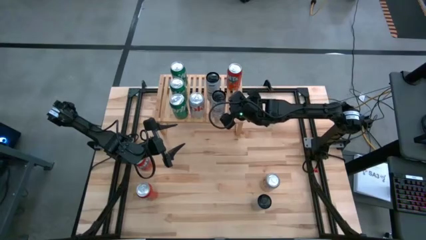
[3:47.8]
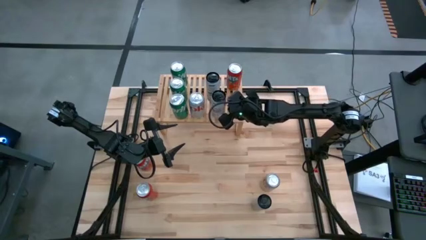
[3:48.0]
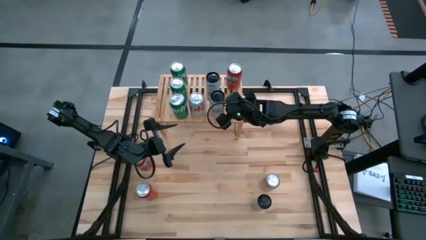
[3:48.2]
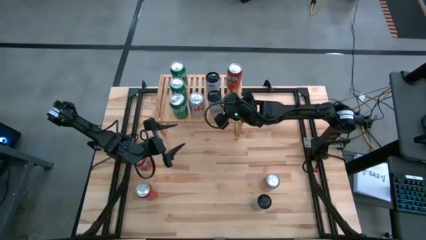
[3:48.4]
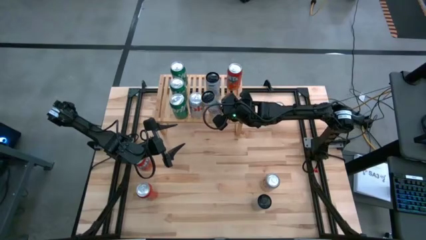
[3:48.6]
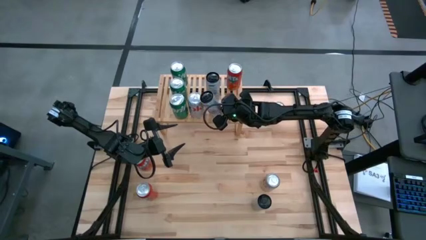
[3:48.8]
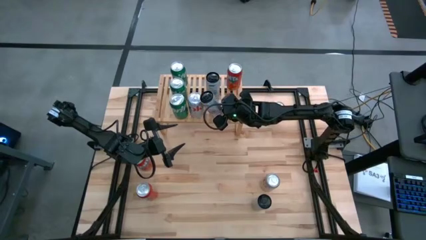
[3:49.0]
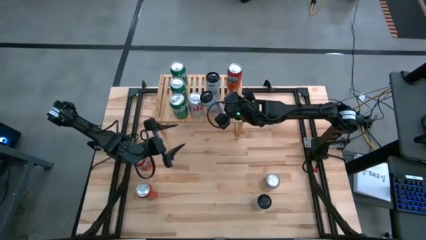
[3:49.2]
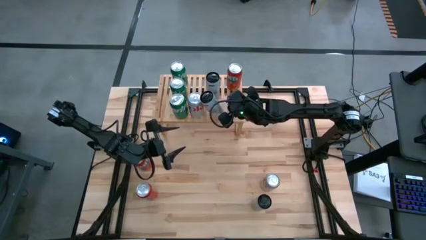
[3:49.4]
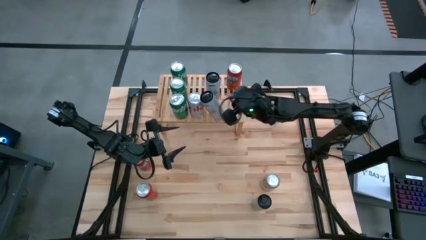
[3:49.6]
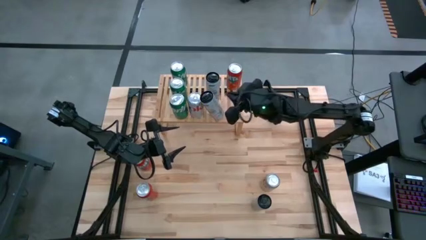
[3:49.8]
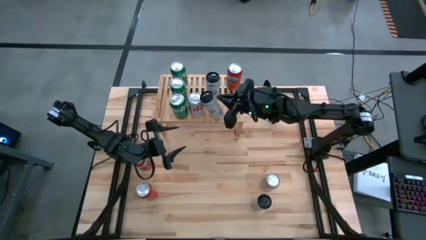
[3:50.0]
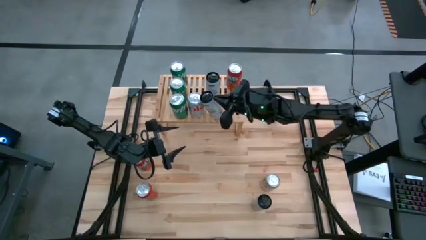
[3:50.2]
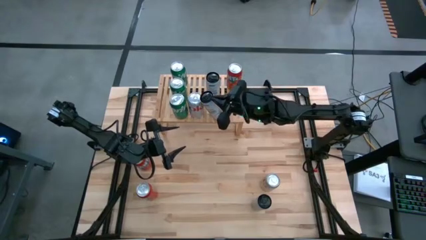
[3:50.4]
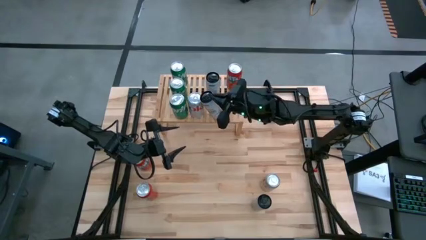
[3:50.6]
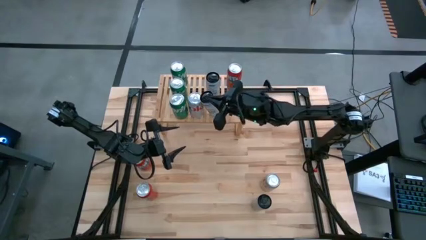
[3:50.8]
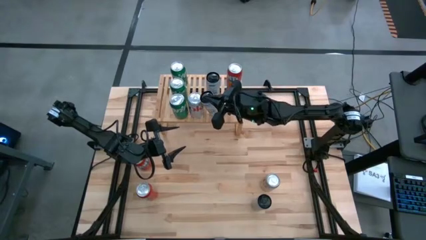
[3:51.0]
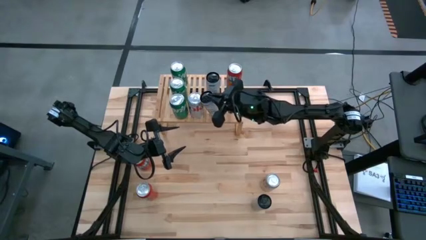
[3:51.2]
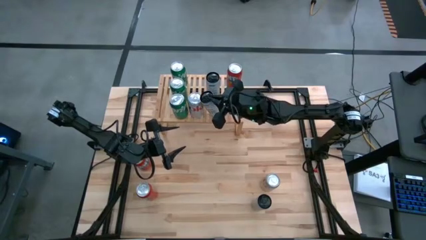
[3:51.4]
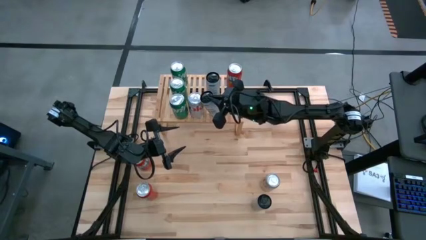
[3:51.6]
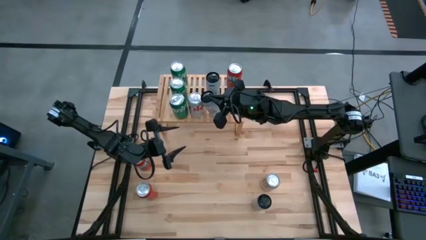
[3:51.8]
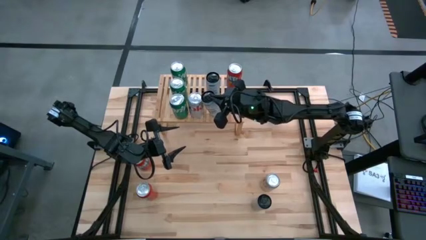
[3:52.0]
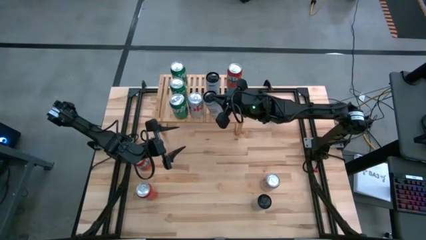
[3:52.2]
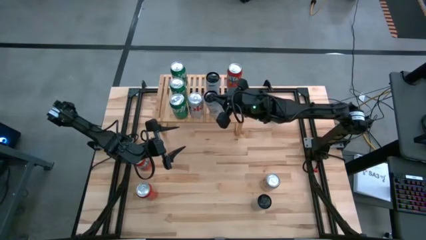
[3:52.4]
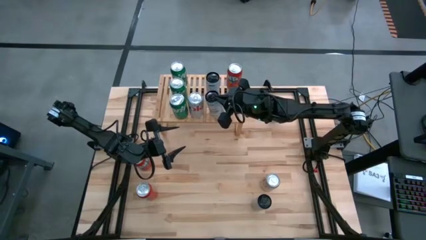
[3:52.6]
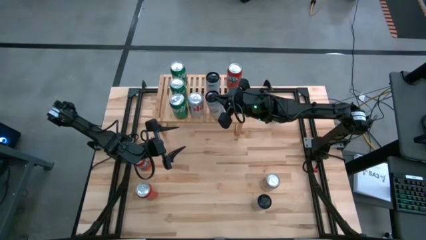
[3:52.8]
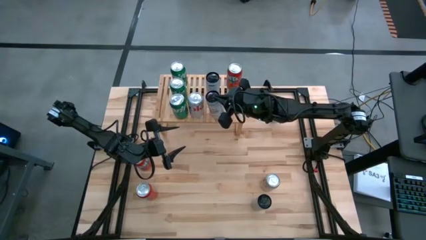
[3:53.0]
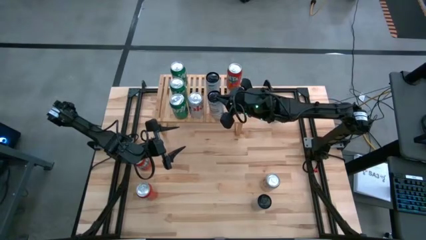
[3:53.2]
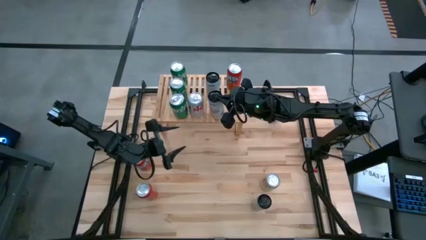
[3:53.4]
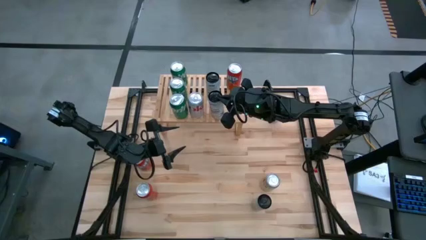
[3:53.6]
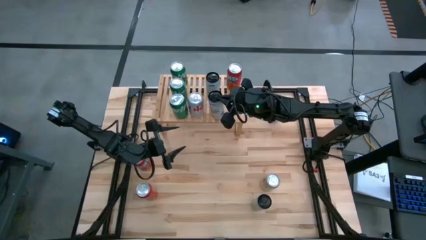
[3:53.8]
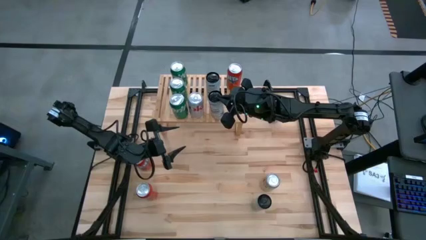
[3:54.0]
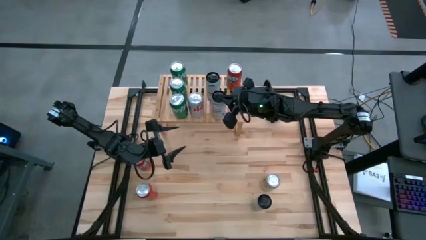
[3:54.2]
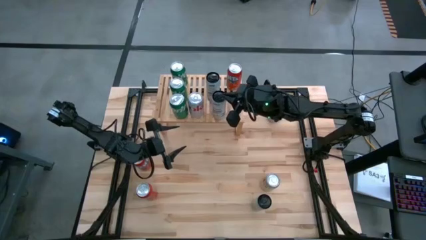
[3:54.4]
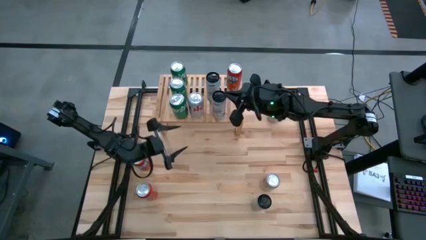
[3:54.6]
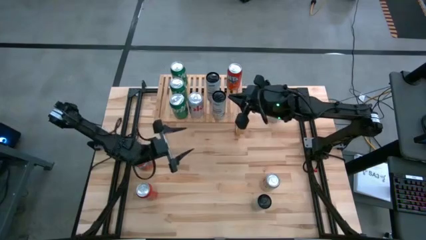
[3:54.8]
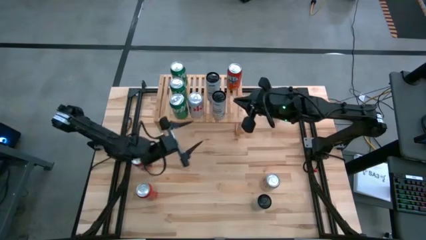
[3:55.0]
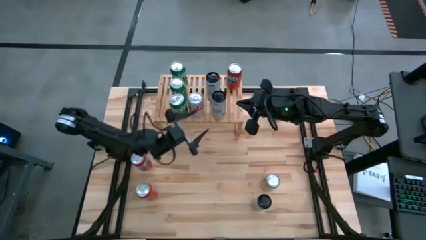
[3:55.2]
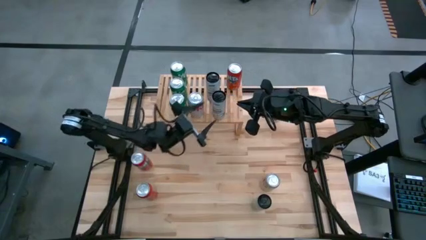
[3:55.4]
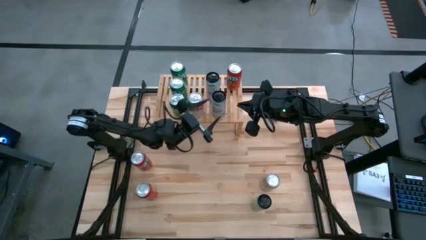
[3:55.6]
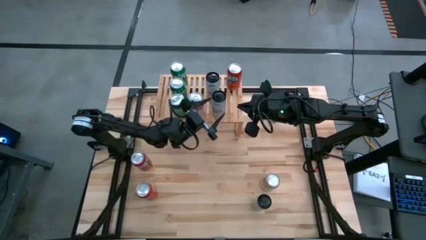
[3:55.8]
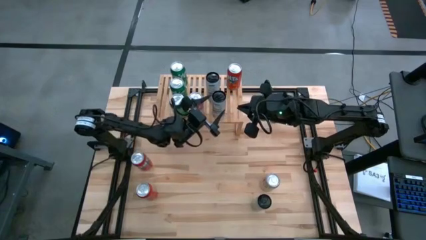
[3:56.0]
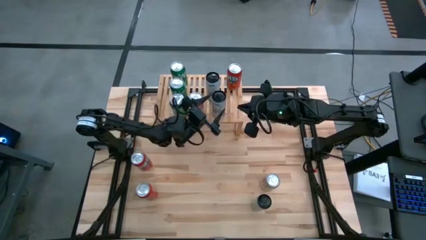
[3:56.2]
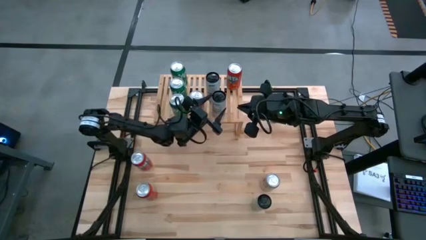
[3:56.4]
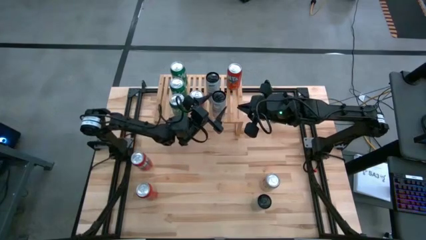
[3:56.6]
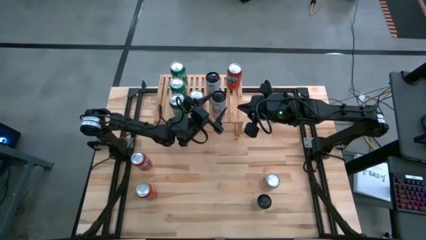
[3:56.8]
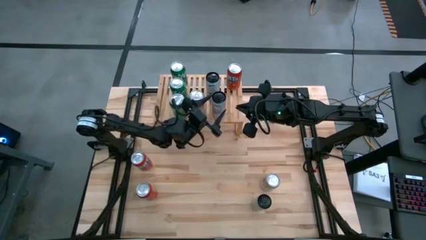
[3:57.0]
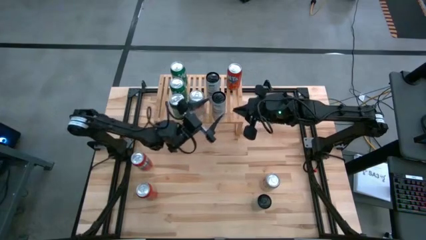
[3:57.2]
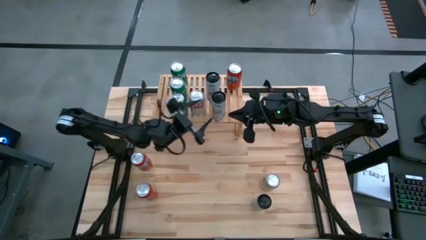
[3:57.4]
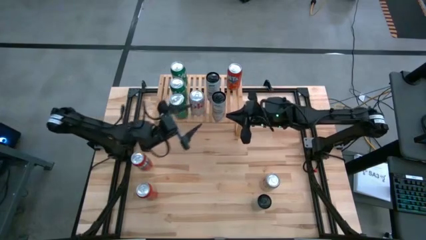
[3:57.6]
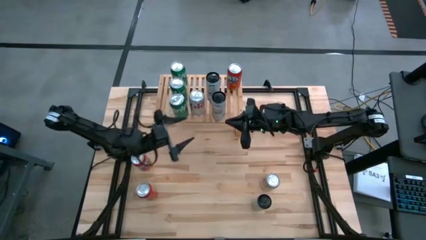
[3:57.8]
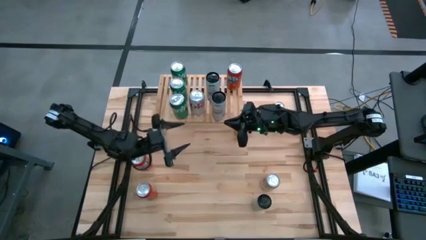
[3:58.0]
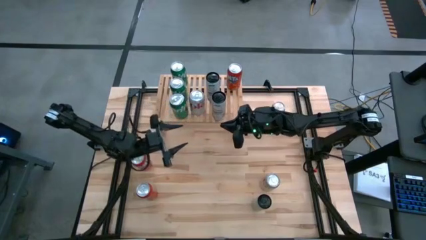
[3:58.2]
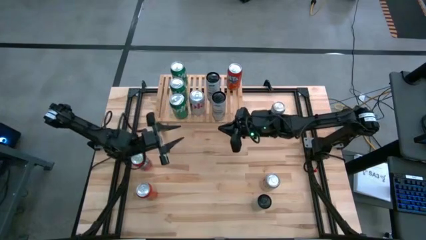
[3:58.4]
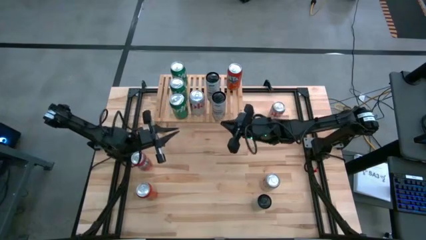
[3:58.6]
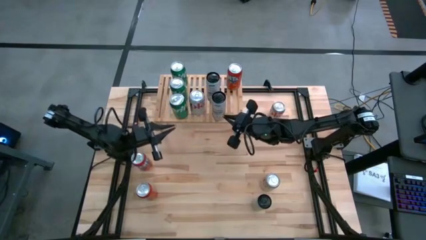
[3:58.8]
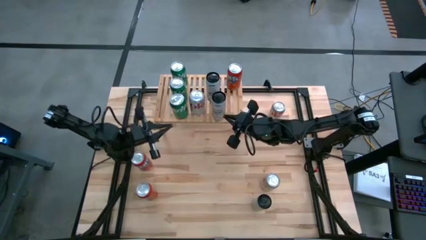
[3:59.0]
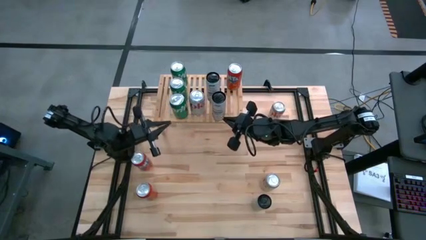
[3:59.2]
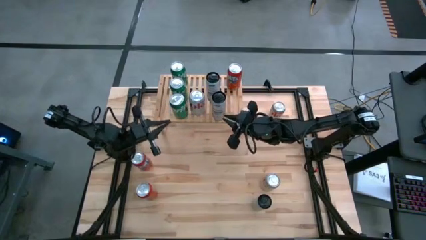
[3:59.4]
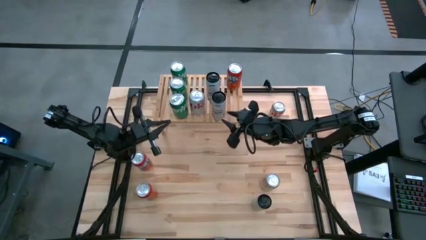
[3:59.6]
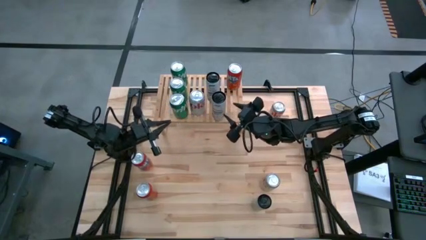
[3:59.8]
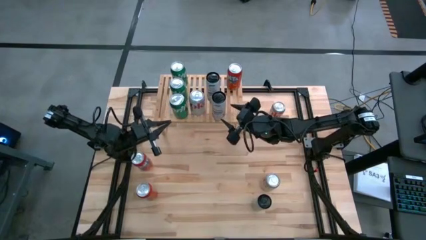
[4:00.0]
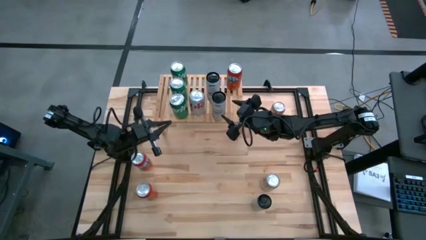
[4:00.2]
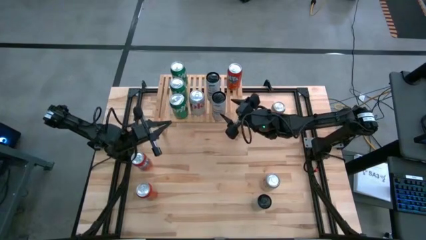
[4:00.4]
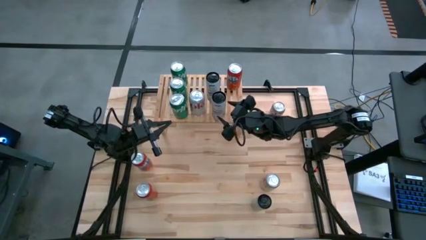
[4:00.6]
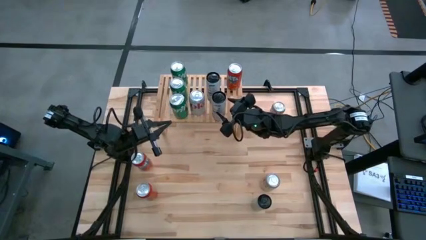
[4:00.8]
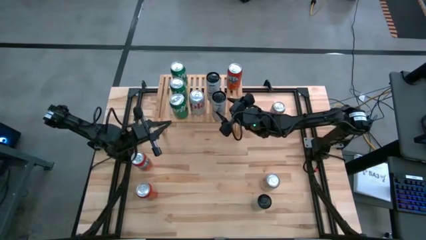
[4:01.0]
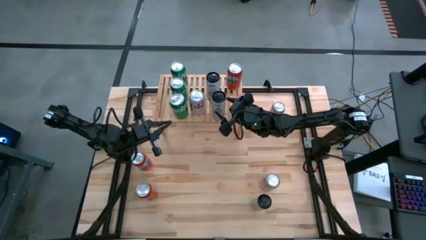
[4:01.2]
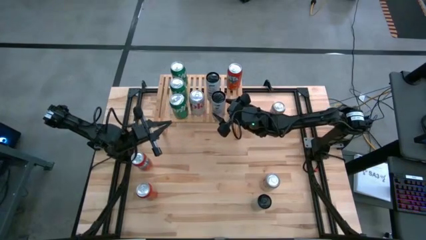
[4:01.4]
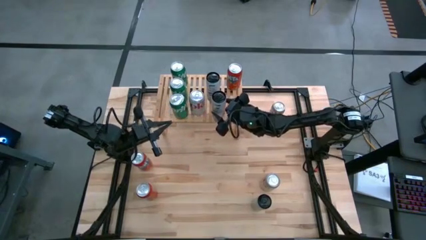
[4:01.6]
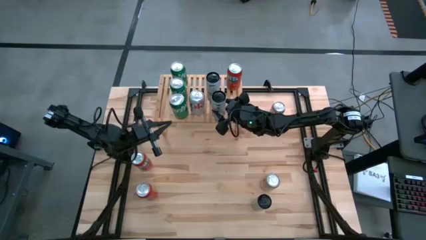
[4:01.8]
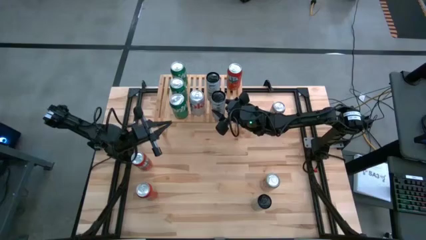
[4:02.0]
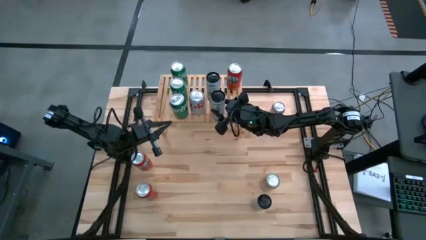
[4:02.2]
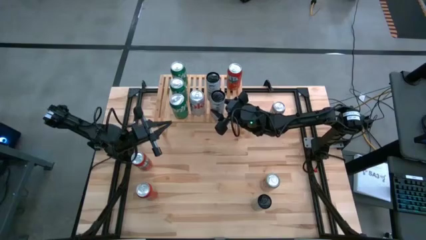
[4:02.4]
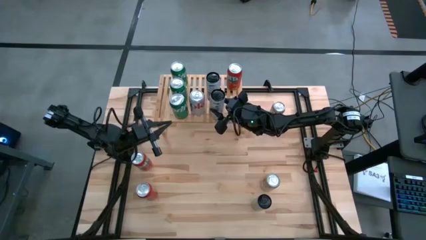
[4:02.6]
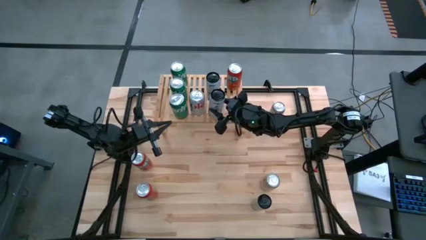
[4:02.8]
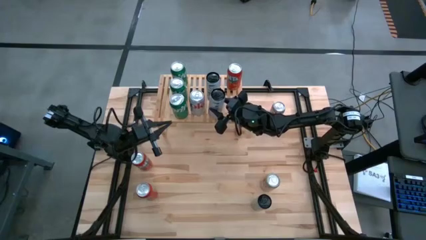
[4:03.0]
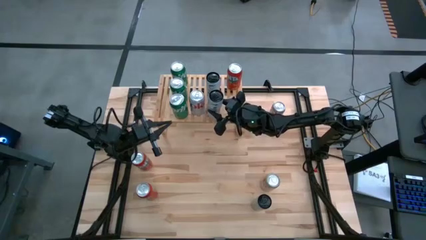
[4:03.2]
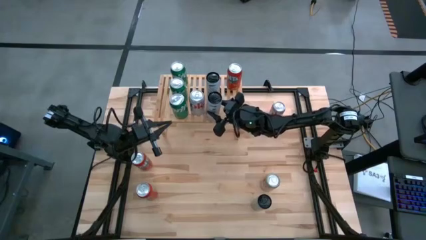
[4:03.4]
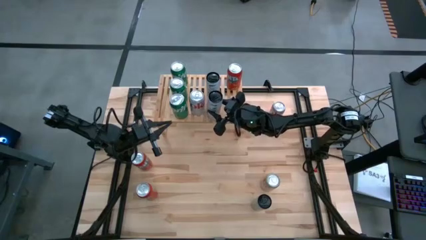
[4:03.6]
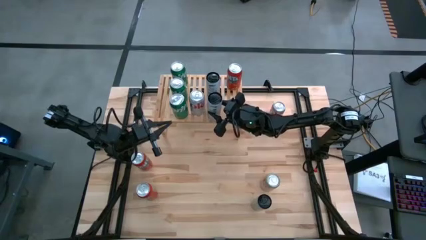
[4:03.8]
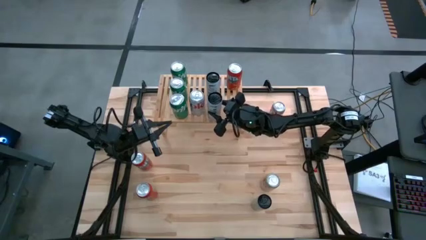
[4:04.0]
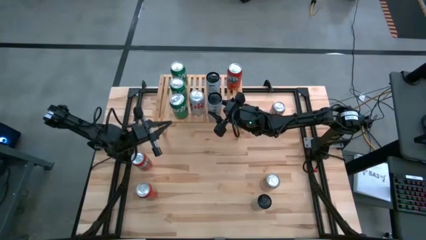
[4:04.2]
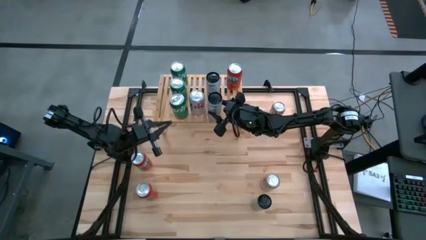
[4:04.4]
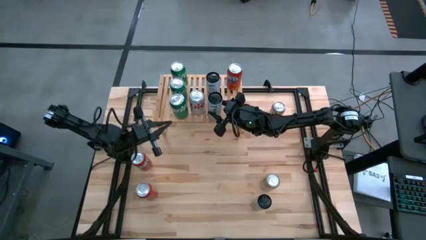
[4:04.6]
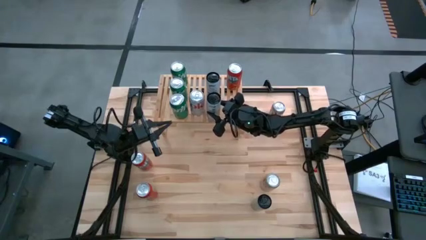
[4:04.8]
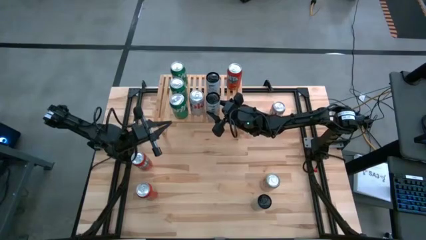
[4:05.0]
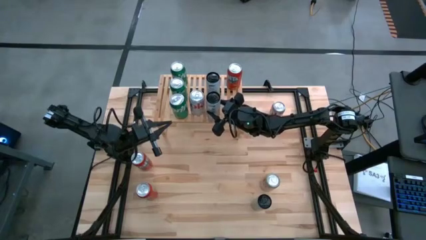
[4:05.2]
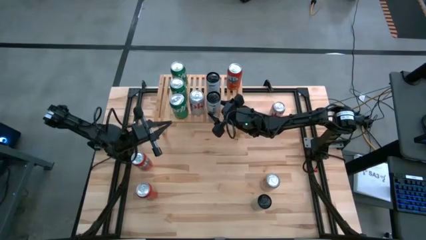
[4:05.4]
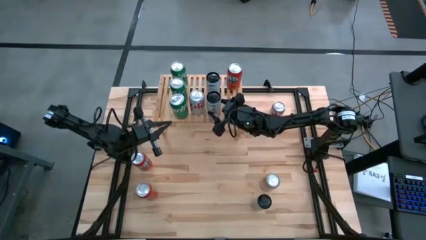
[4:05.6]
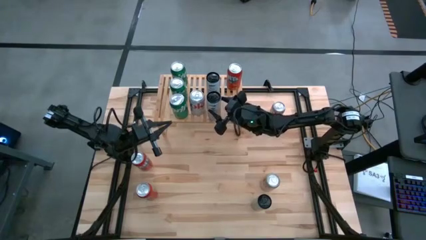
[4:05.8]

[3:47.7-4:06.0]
Task: Place canned beverage on shelf
Put the top right blue soda can on the shelf
